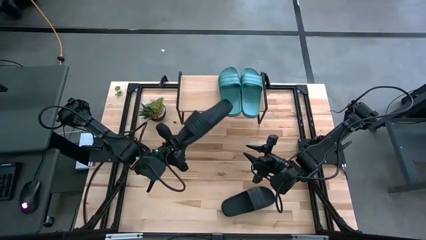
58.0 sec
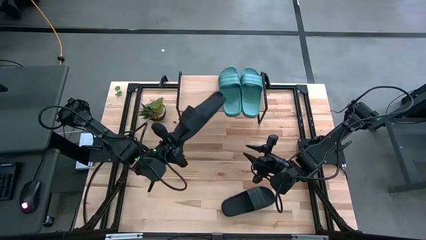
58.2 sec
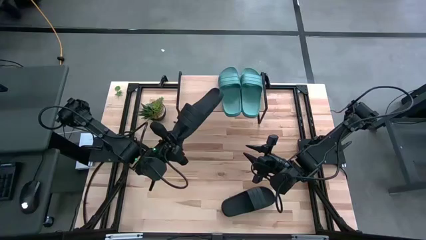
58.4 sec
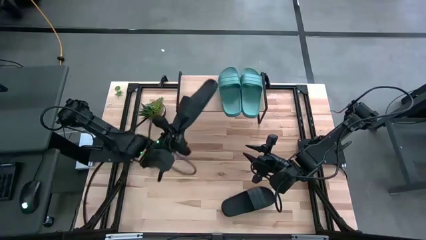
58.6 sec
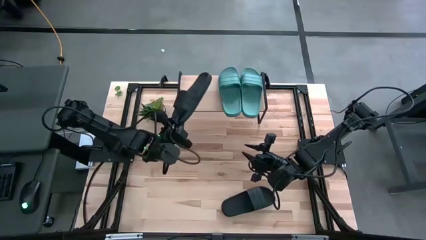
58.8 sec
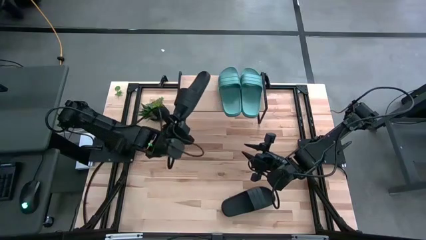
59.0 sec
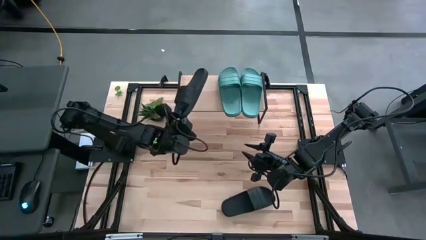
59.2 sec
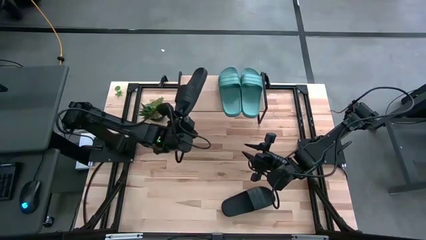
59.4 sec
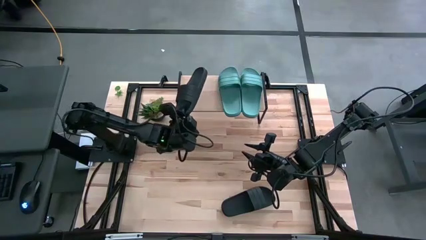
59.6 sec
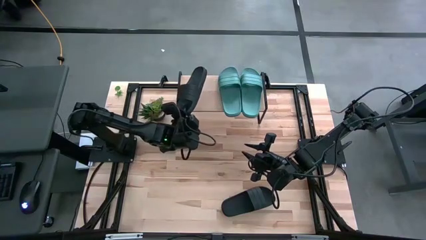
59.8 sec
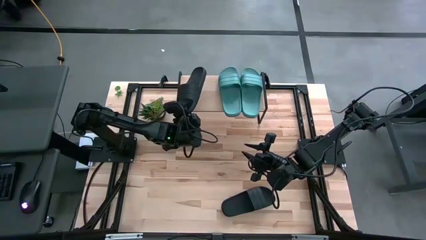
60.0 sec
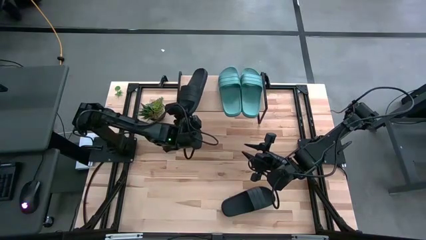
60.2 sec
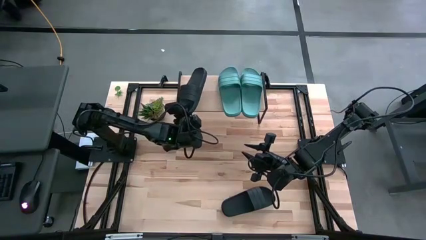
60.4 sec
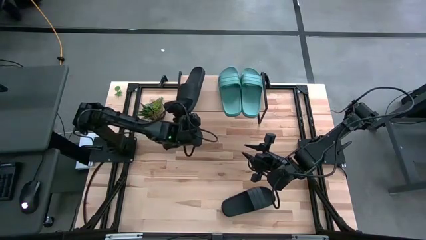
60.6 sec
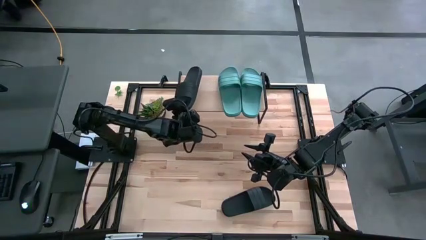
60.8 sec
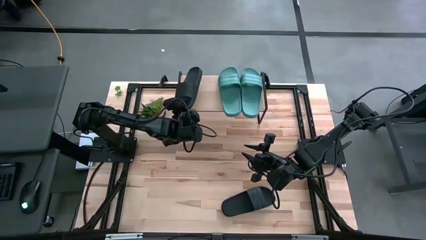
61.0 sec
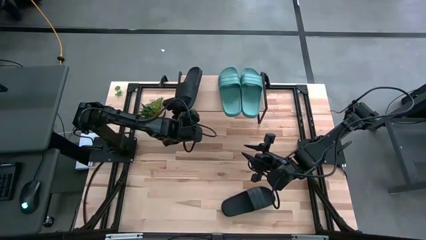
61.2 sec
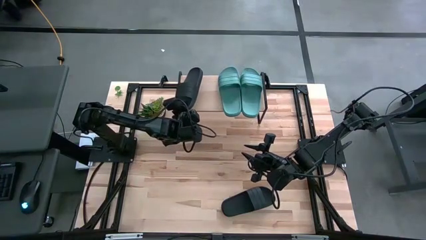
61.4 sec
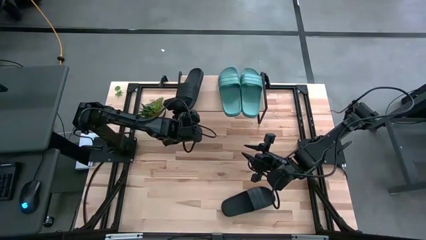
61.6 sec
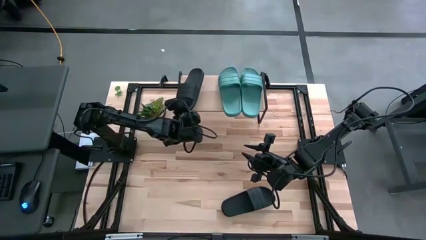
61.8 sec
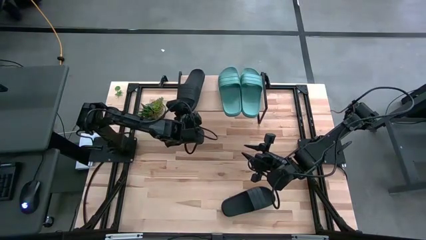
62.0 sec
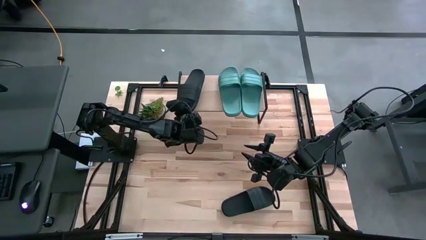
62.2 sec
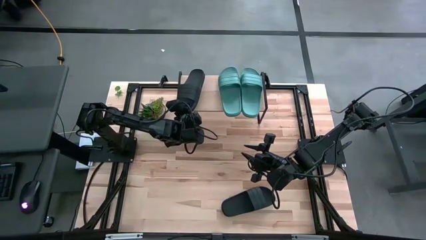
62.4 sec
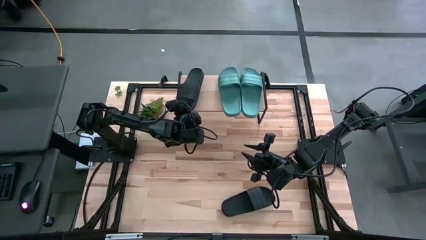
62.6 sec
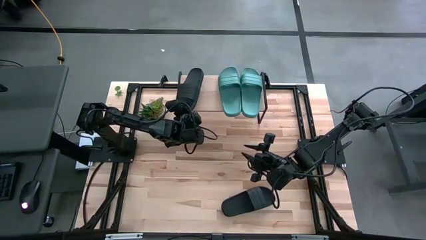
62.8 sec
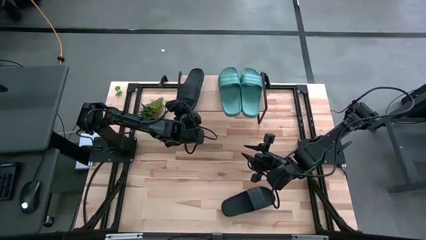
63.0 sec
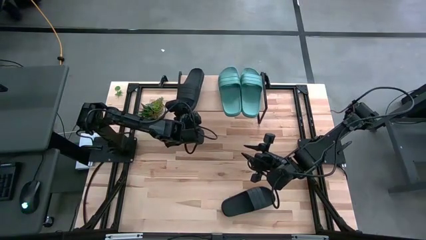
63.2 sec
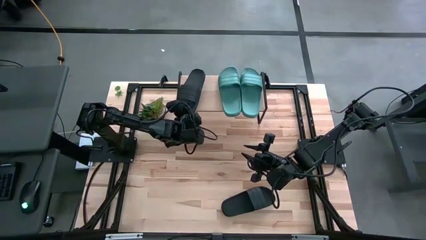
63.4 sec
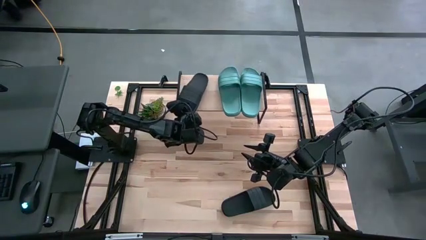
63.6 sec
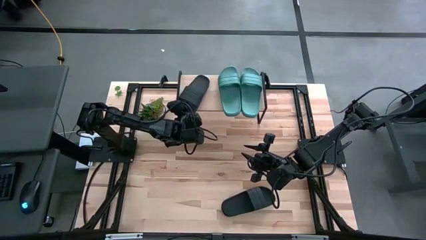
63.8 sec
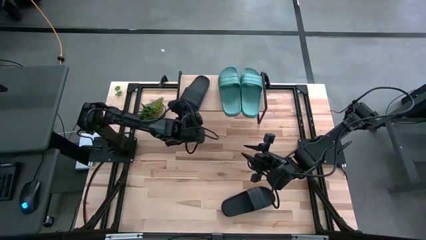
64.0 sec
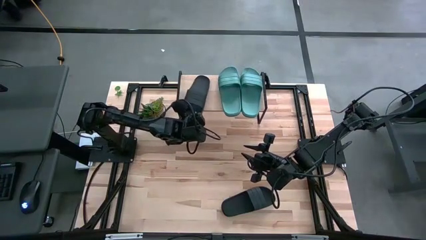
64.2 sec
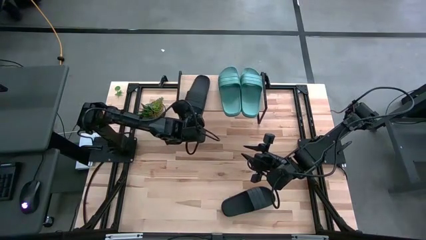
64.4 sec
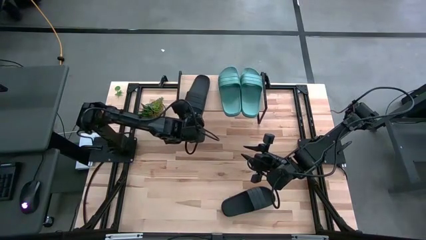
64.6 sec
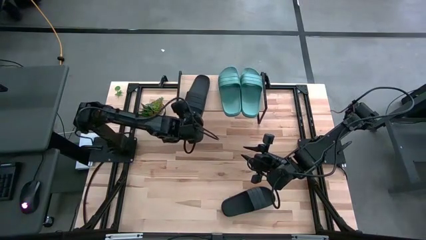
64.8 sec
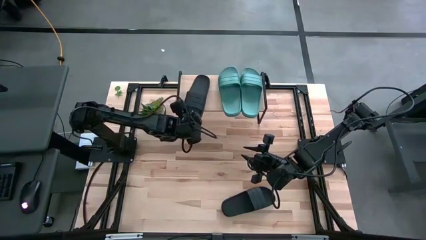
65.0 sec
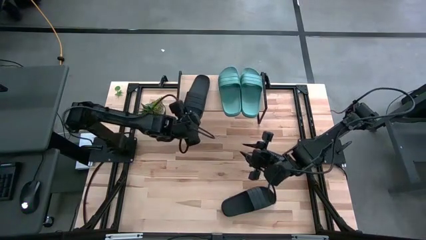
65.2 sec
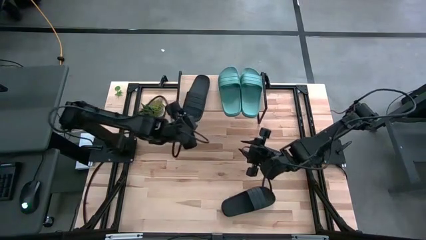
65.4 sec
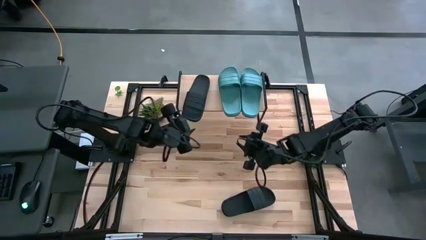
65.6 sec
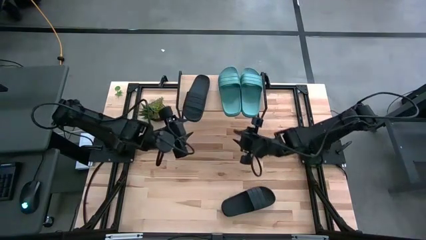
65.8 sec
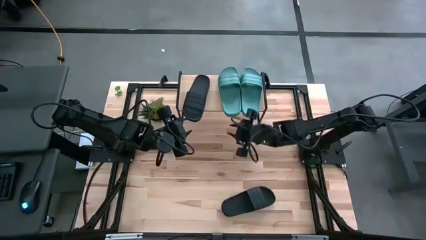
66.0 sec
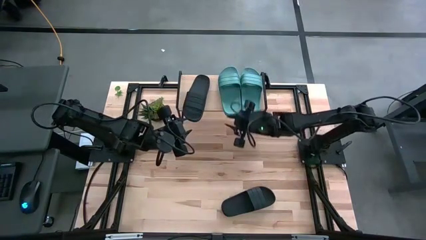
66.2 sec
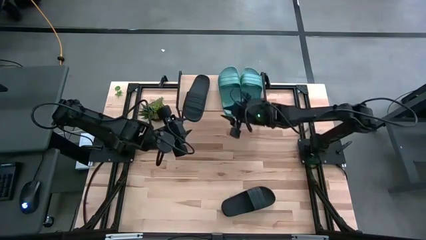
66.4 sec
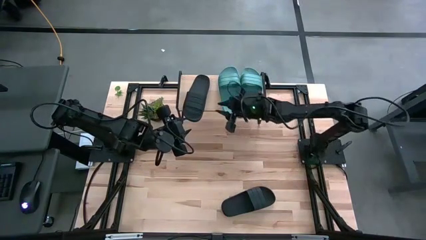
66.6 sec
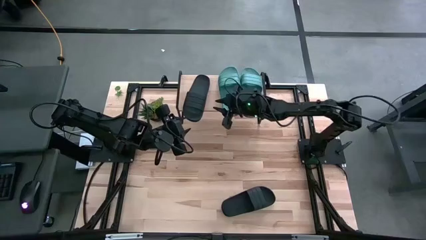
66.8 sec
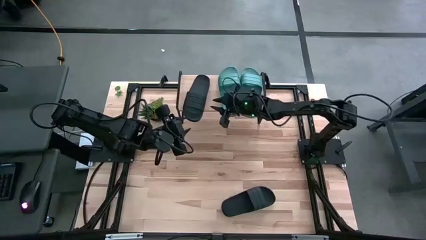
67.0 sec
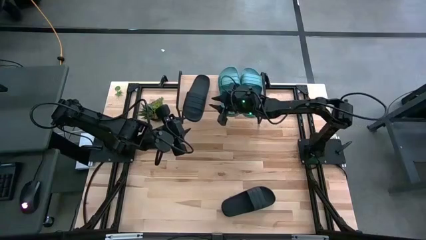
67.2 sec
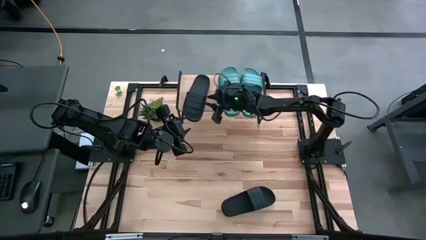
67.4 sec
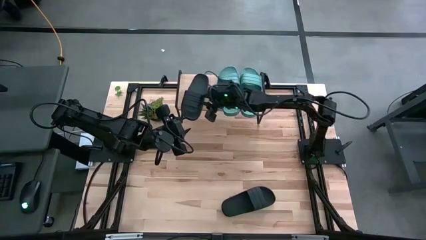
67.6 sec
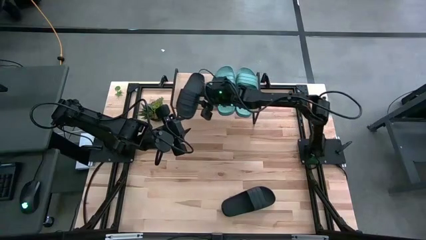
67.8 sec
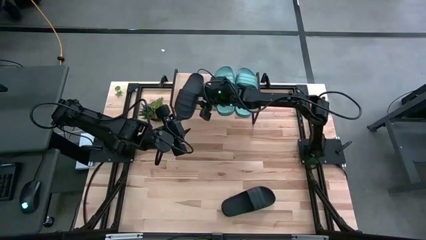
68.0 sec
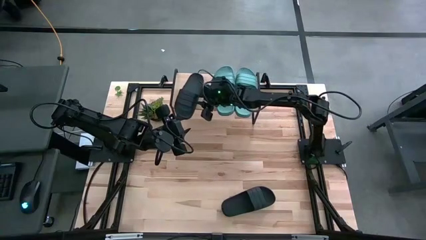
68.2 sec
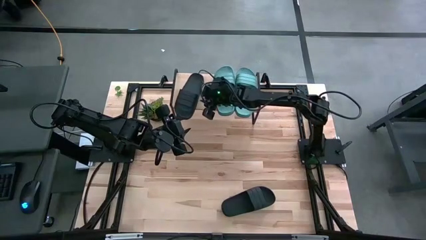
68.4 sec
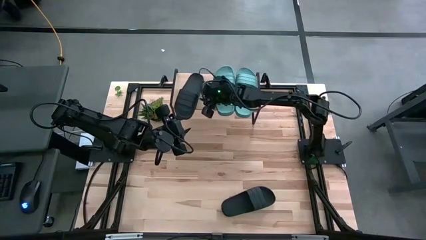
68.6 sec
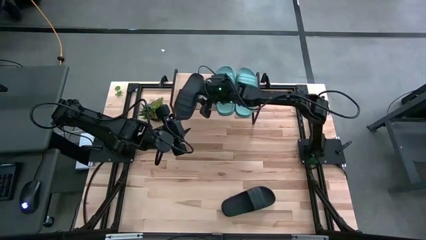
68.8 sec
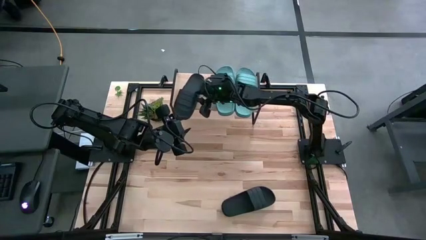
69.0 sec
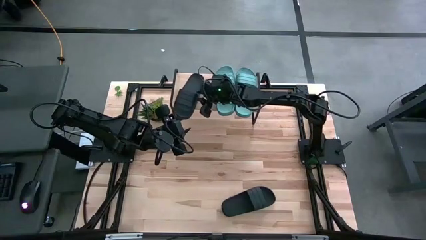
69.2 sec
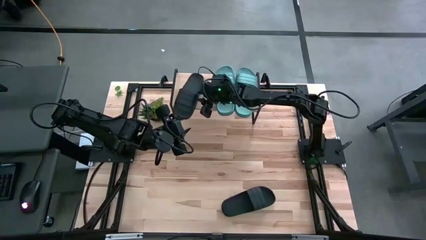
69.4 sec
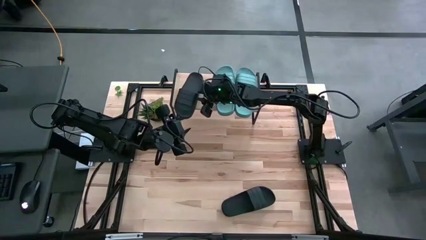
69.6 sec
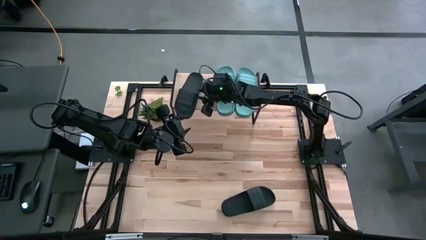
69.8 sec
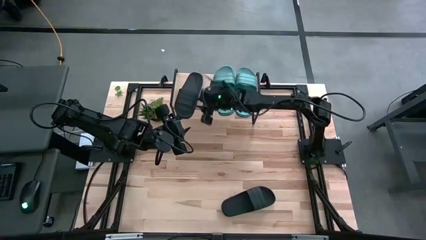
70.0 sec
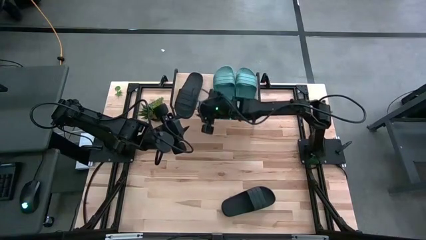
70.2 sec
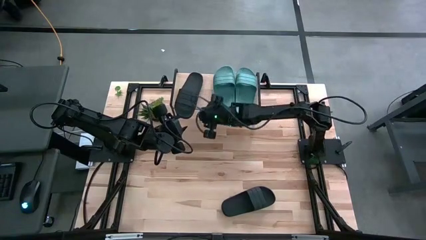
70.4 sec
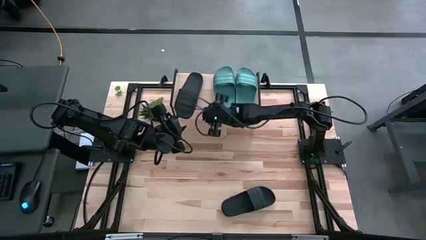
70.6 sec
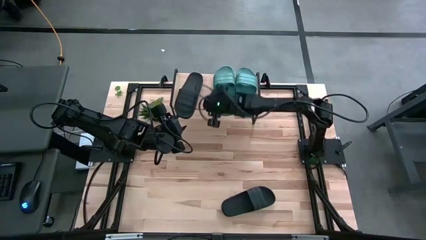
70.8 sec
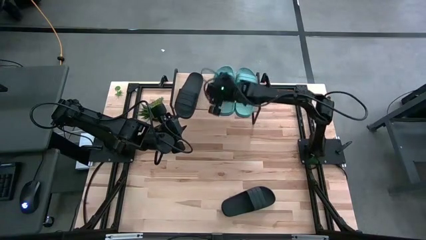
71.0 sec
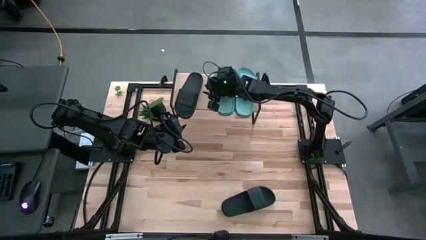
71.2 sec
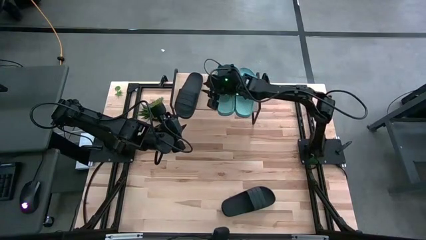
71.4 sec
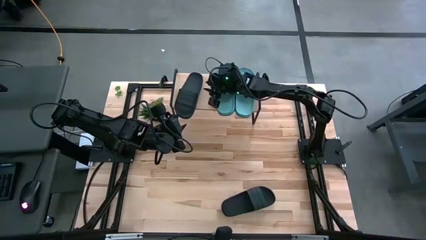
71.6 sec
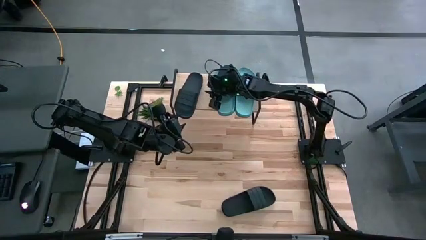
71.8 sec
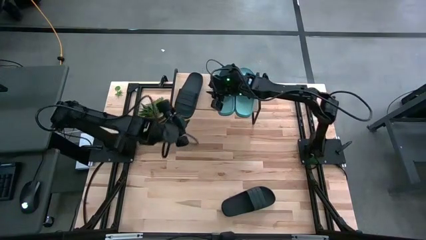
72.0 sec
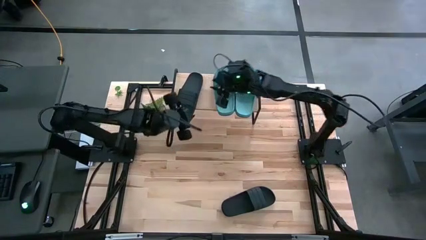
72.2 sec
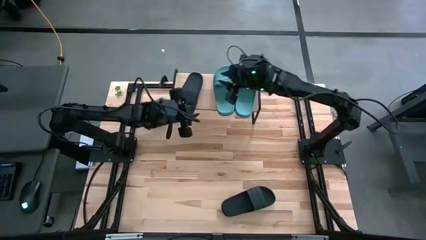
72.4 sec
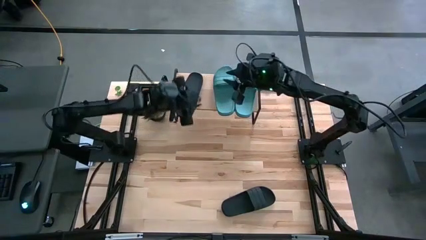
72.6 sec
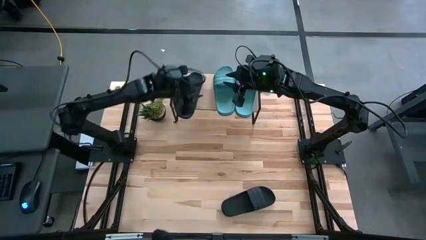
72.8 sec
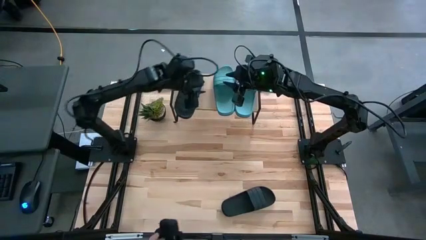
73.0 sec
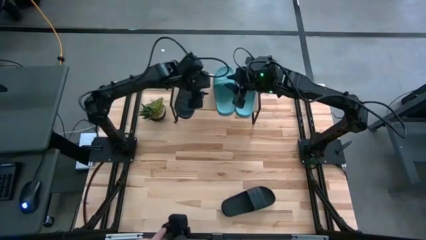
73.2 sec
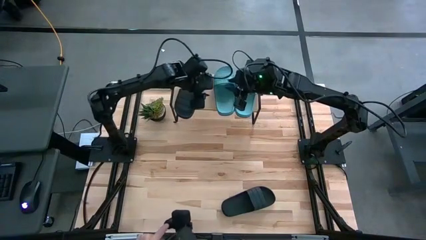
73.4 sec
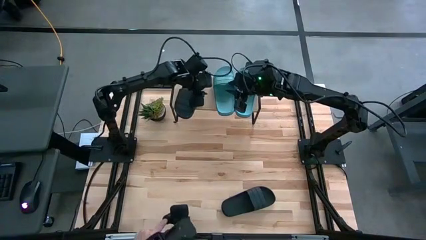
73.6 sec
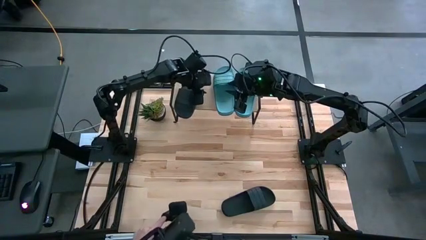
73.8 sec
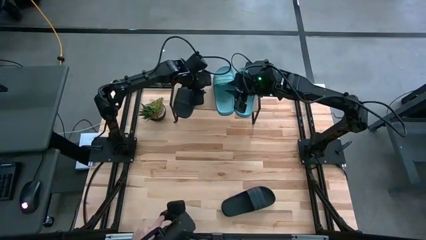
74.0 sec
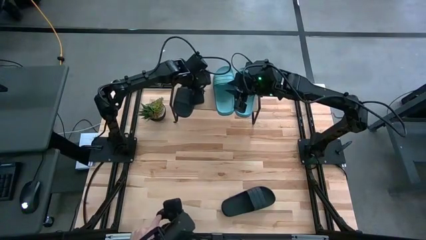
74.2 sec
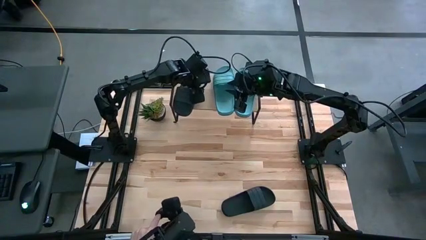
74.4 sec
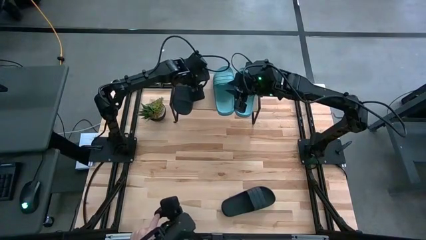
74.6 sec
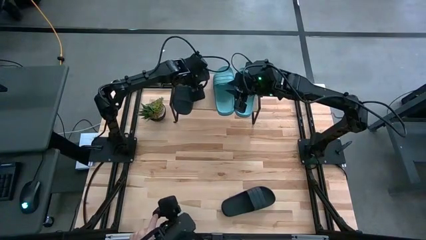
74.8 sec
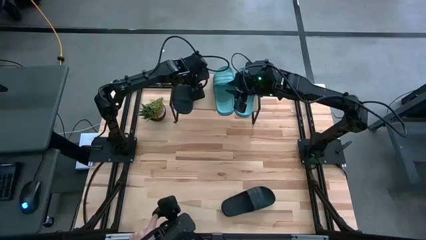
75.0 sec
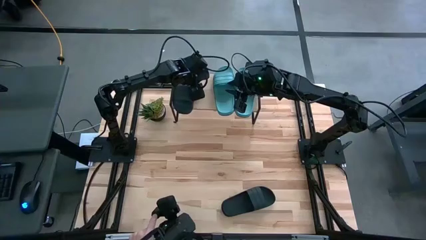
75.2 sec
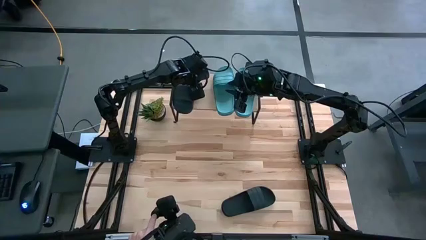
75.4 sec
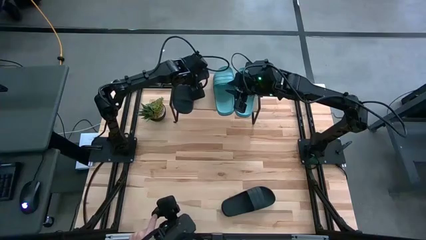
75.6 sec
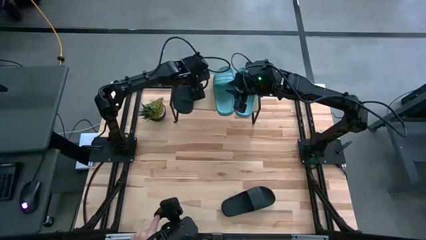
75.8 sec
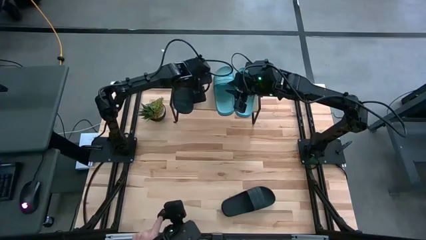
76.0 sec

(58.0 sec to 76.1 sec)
Task: Pick and place slides into the shelf
Put the top black slide on the shelf
